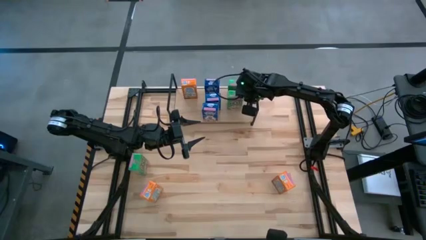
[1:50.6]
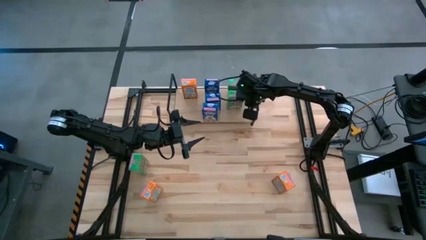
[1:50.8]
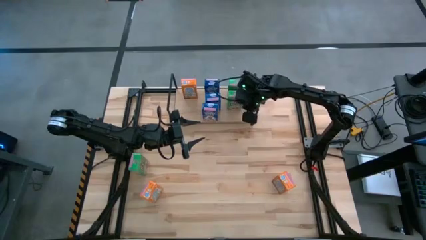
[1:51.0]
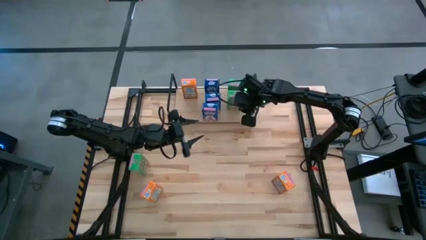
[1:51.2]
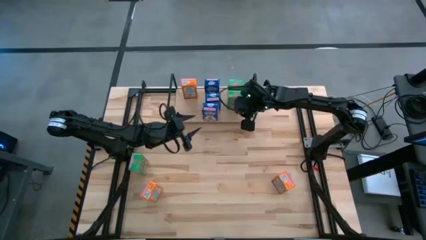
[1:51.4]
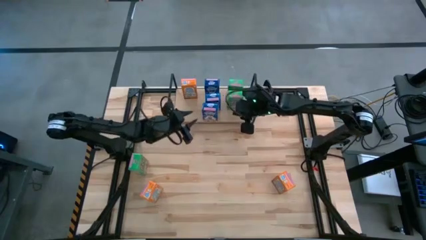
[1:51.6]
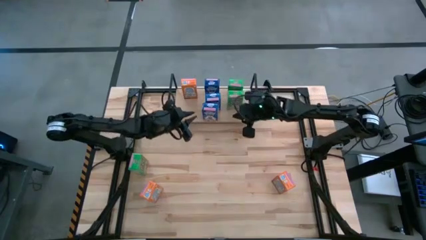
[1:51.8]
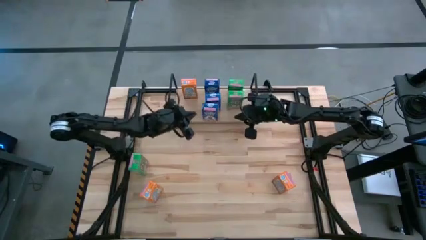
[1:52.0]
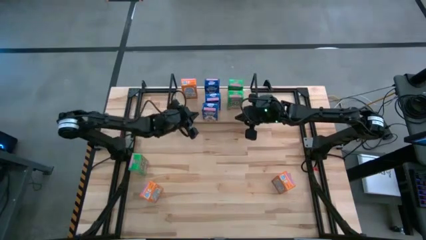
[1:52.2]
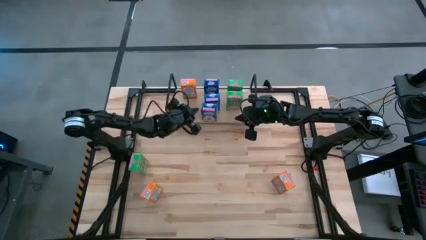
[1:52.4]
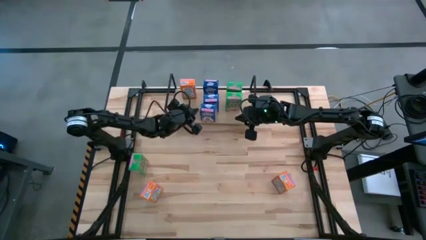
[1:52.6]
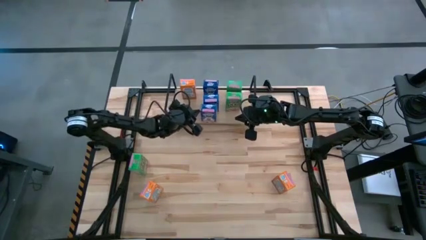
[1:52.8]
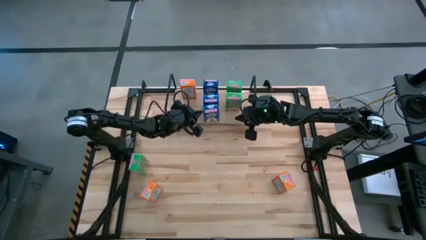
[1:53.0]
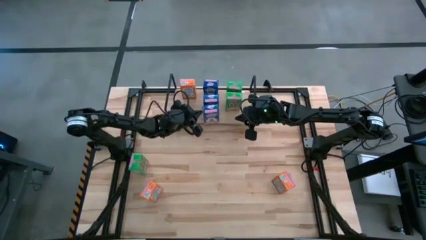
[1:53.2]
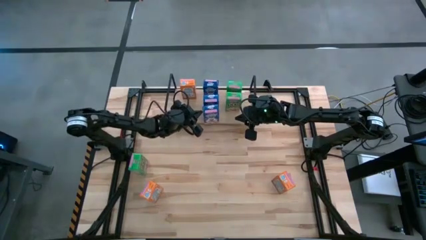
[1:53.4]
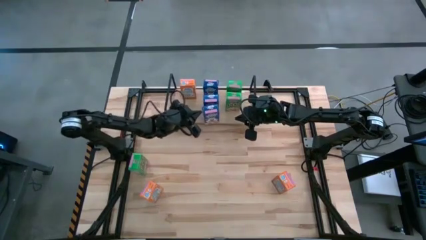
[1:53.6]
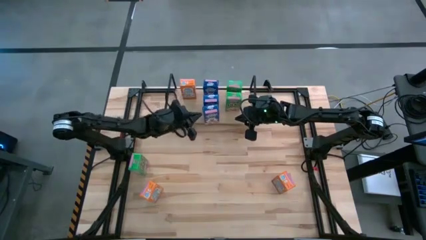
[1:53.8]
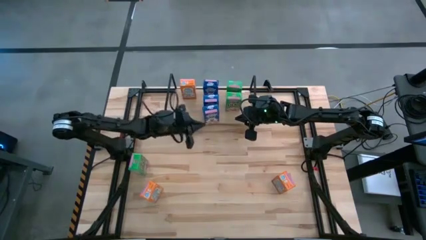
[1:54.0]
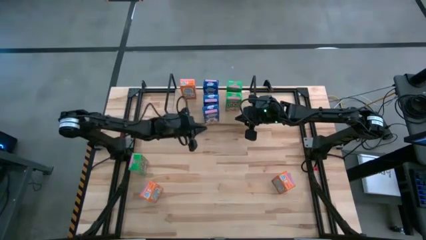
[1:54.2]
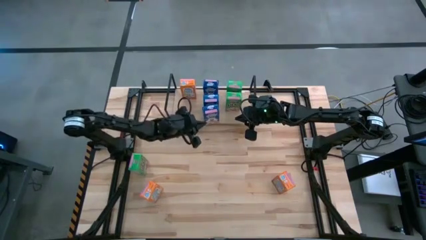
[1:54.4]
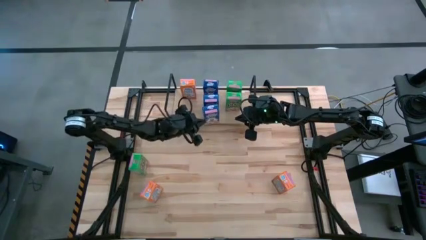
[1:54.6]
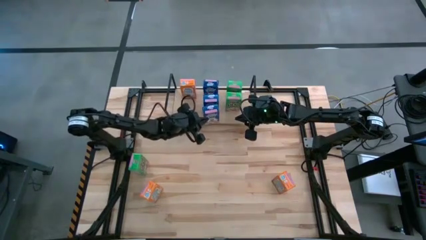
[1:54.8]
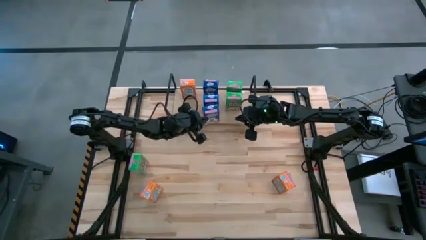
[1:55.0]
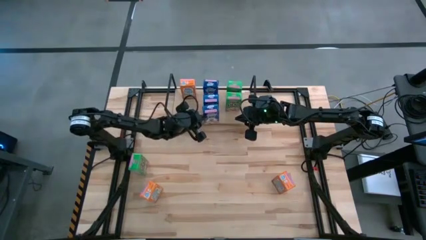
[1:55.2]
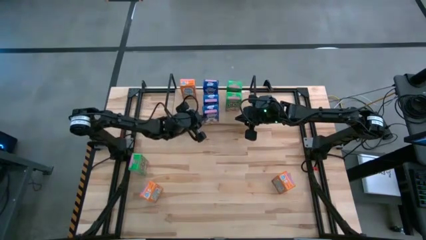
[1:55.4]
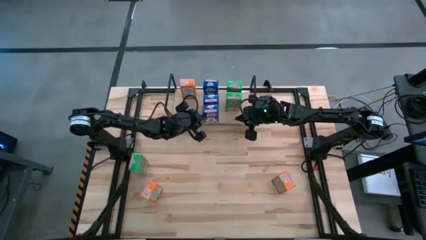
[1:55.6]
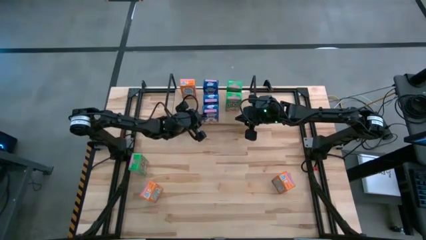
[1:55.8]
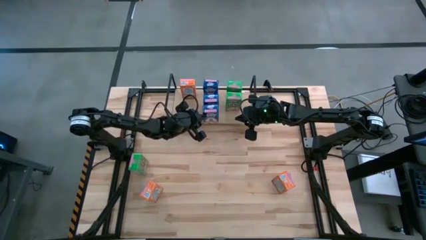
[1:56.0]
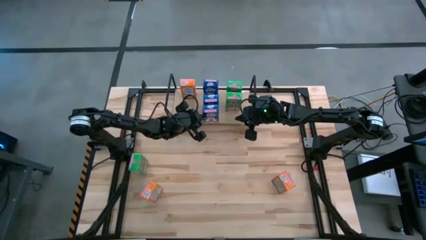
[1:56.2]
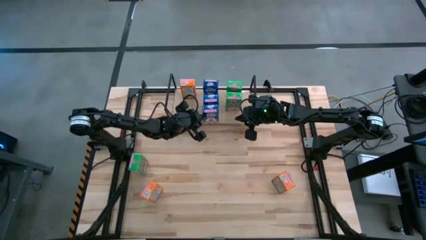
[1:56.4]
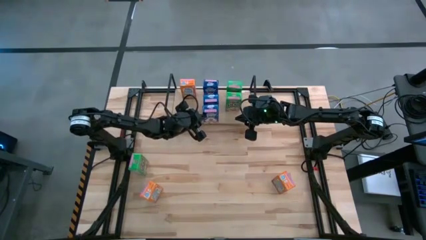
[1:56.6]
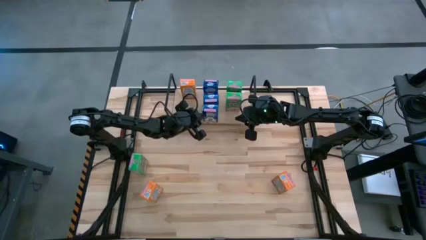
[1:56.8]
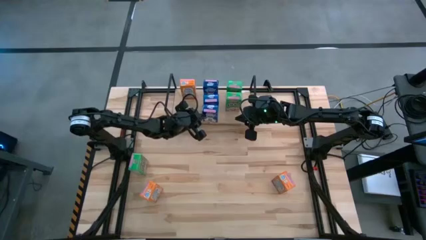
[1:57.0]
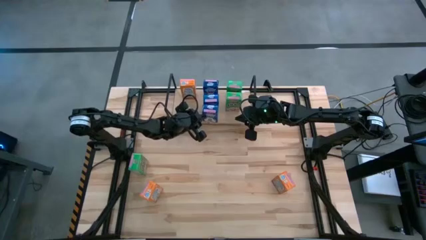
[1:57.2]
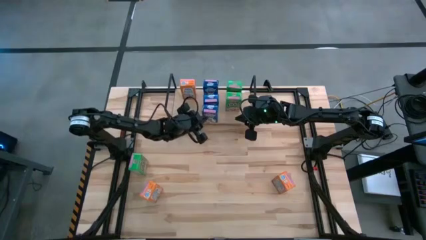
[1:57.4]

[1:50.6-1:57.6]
Task: Stack cereal on shelf
Adjust the blue cereal box on the shelf

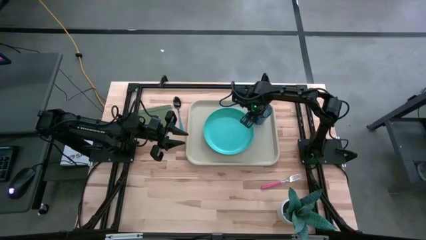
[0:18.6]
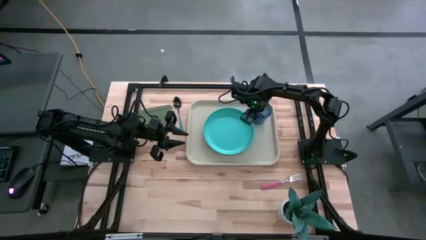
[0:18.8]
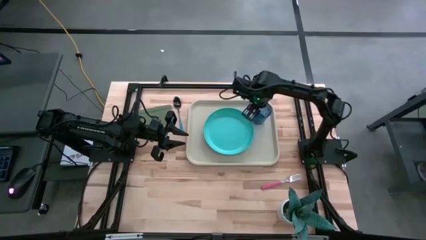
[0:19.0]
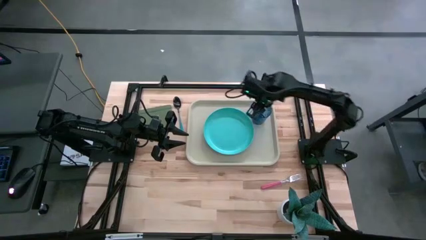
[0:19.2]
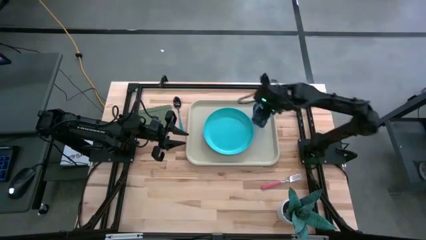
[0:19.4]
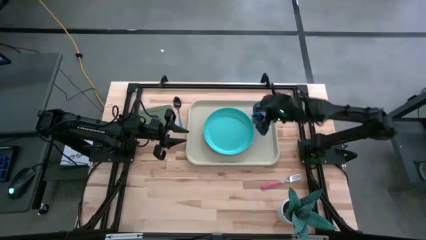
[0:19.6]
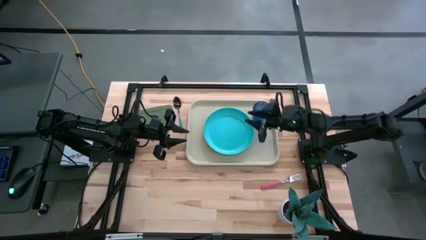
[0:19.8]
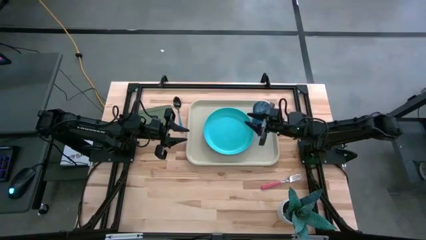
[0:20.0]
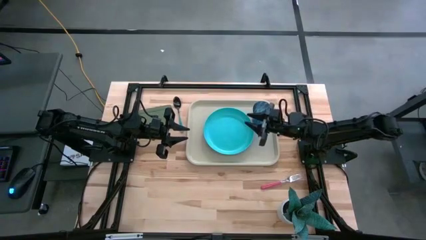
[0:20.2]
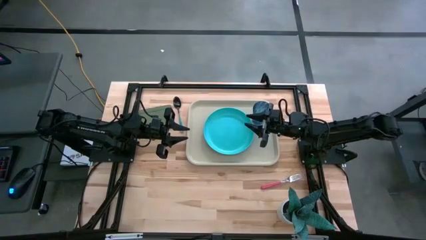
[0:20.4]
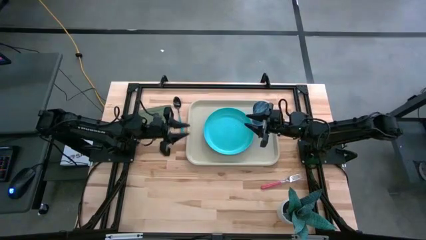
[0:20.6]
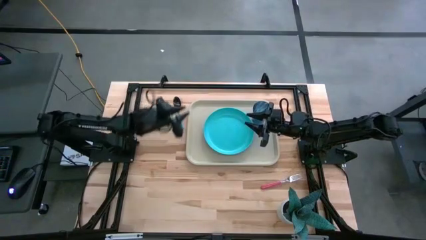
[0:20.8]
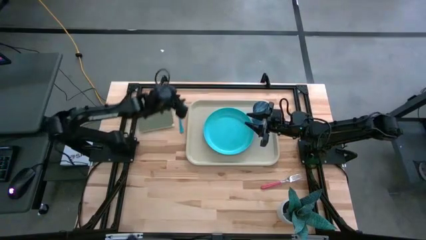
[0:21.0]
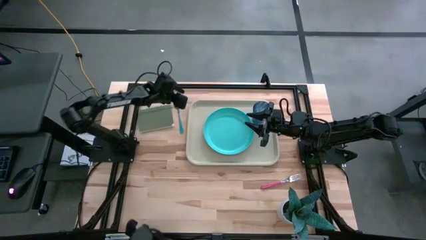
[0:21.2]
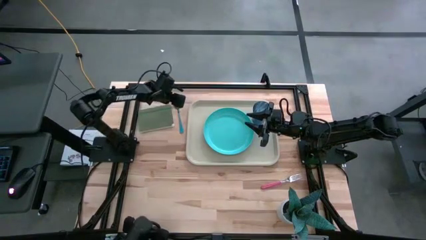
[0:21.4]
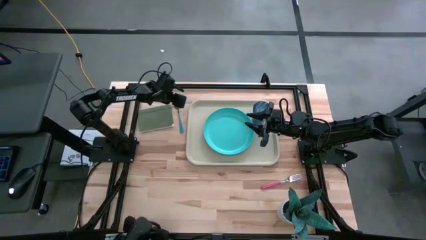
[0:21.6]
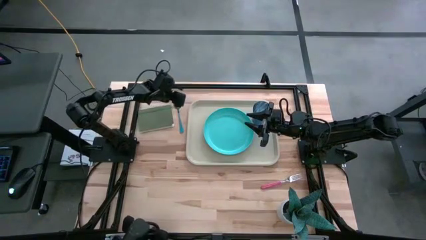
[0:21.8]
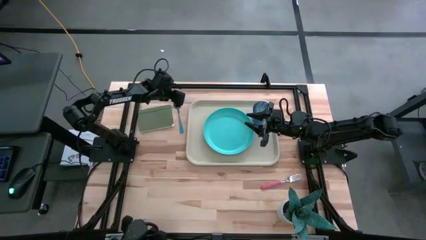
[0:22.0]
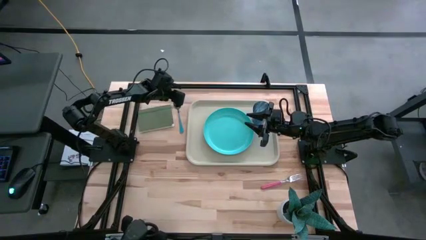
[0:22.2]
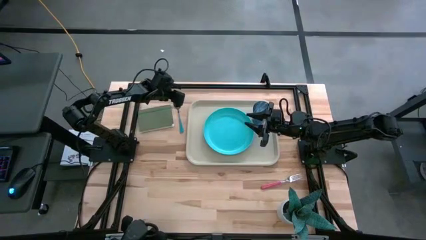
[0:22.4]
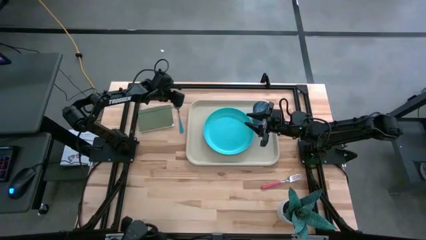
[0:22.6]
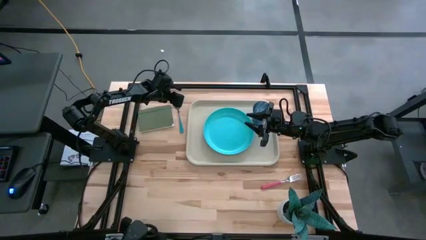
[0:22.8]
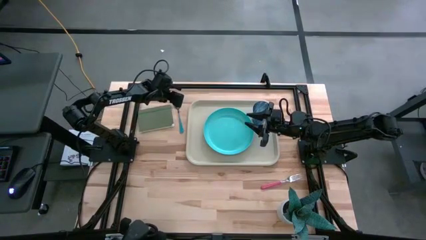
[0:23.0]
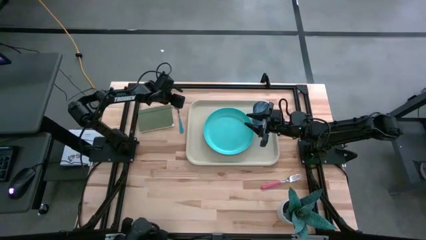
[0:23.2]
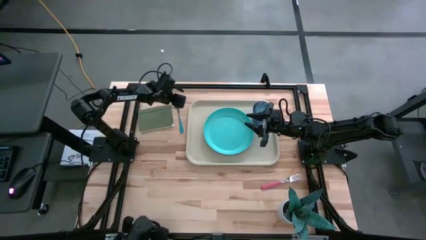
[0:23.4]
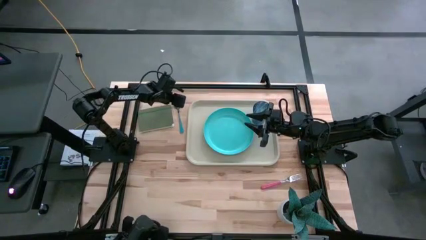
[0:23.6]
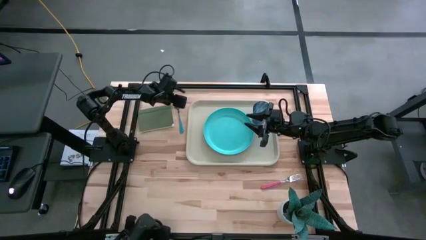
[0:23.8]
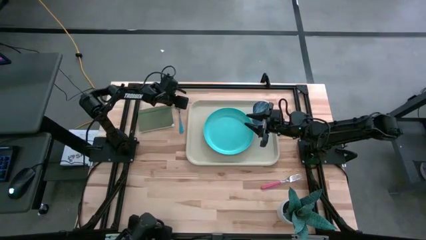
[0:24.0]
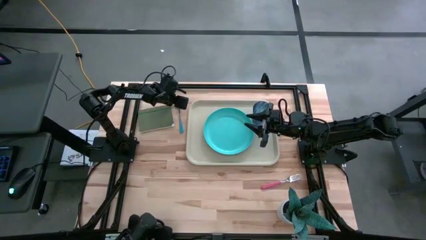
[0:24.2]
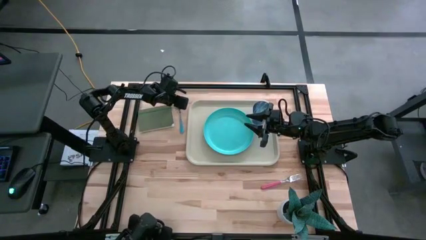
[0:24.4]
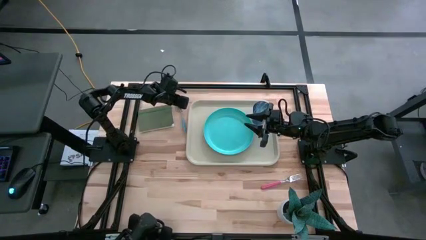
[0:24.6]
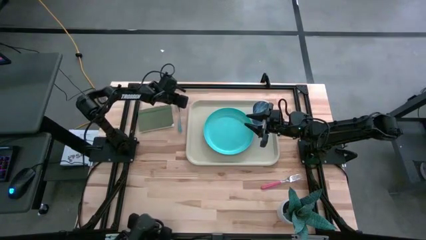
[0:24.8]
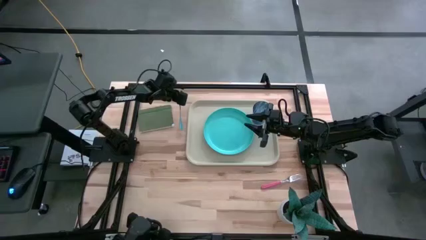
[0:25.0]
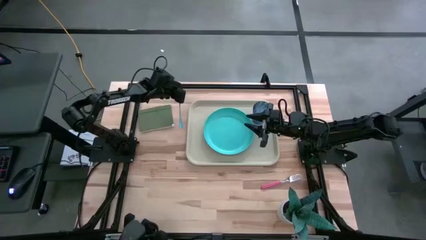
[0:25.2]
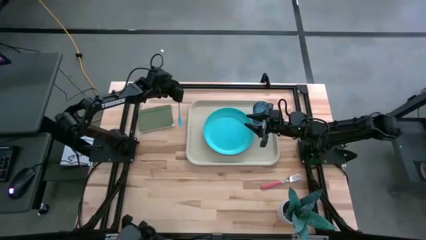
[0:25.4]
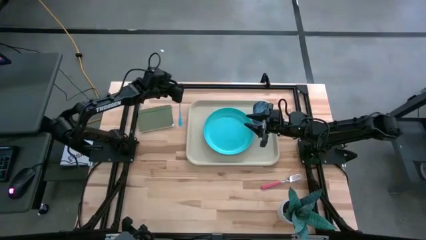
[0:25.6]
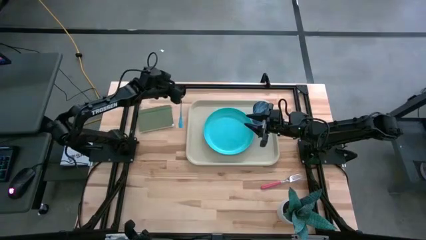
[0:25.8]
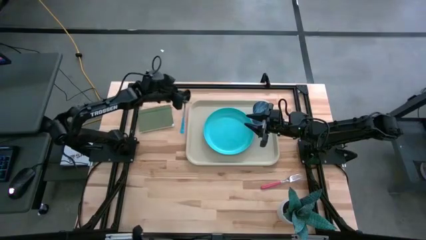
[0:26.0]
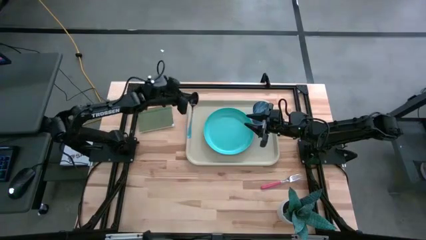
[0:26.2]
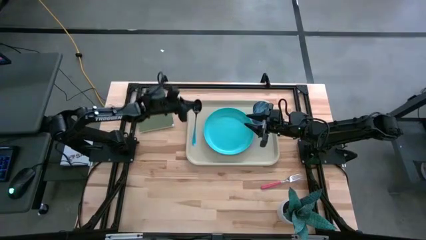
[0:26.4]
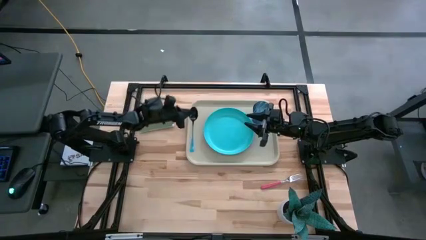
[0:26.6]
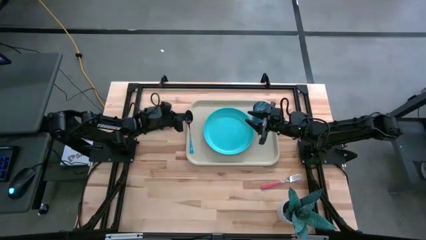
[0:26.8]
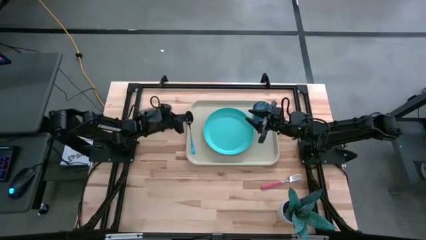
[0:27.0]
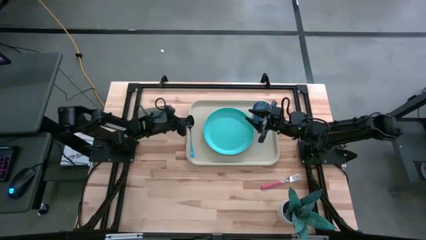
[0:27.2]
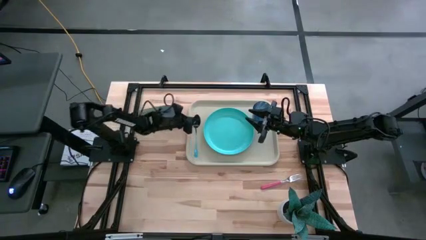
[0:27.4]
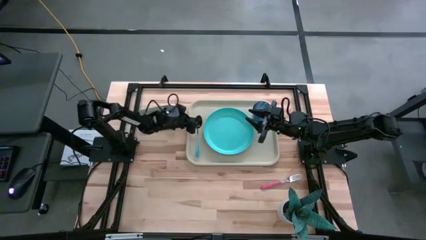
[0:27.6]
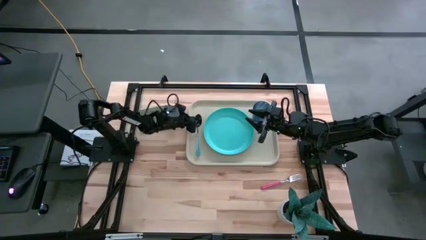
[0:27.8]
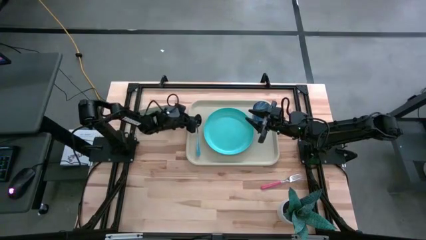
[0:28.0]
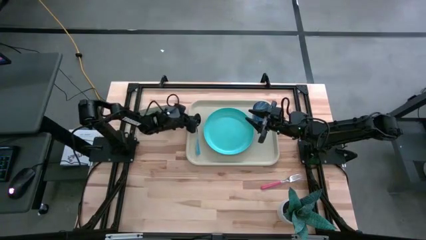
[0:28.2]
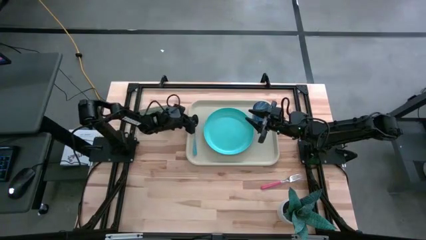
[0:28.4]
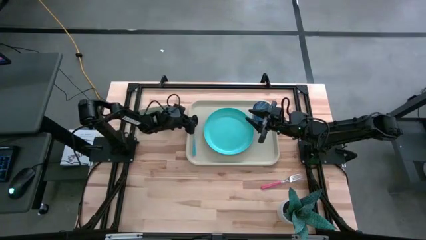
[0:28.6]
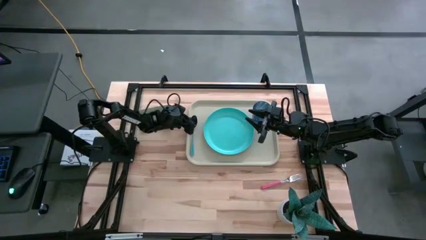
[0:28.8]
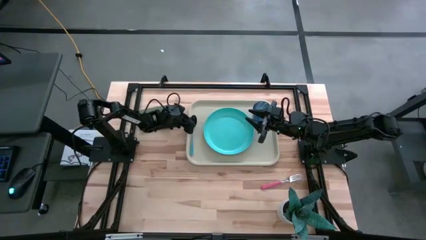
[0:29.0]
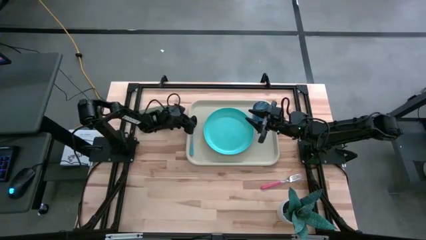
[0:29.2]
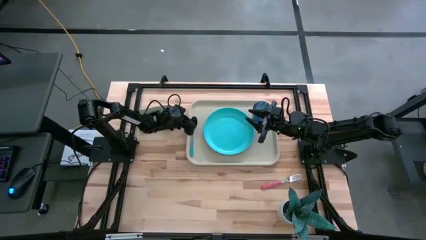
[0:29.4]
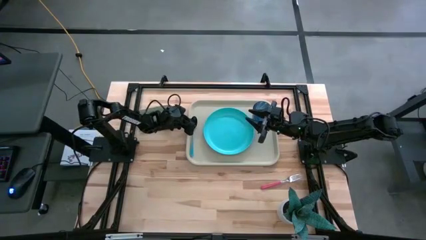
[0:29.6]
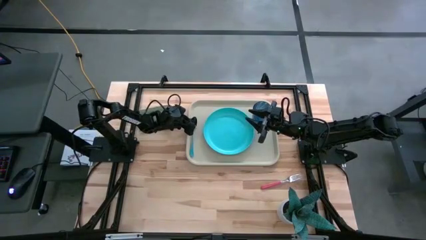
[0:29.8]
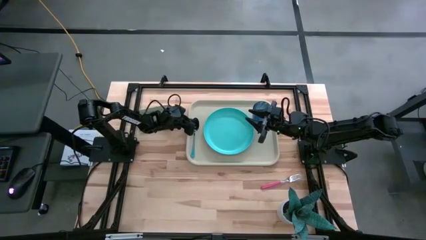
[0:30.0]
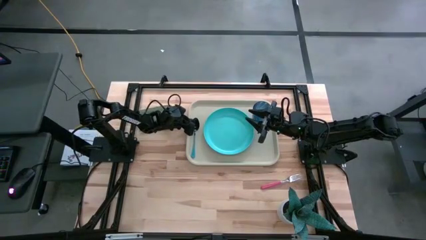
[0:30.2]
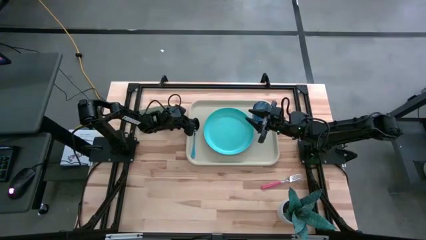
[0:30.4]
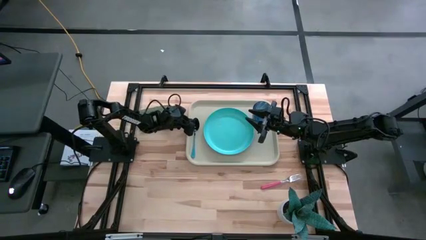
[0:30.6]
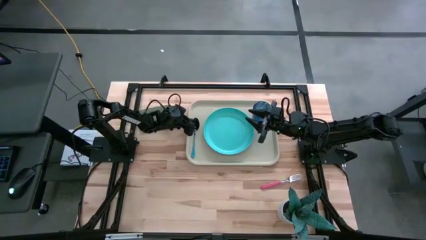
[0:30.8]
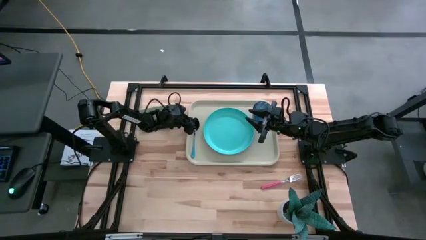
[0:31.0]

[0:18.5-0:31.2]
Task: Pick and place plate/cup/fork/spoon on tray
Put the blue spoon on the gray tray beside the blue plate
